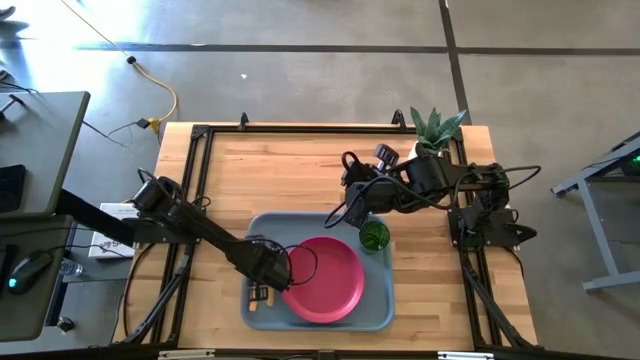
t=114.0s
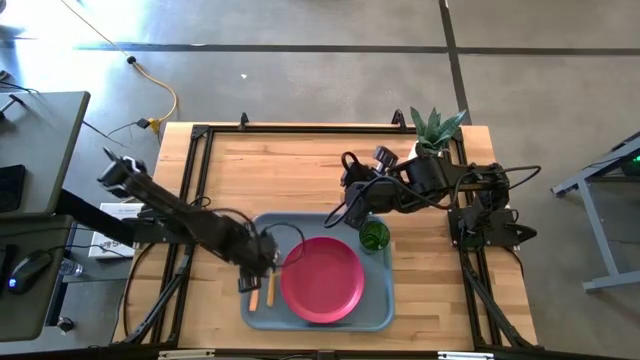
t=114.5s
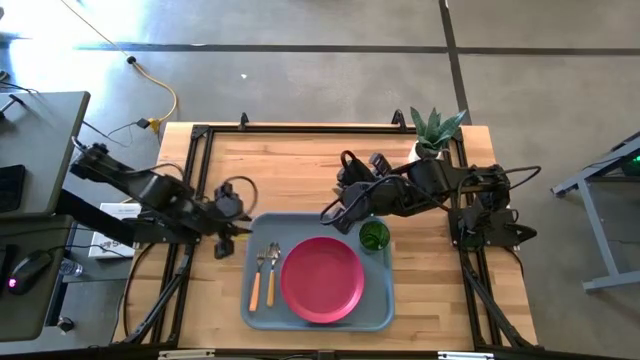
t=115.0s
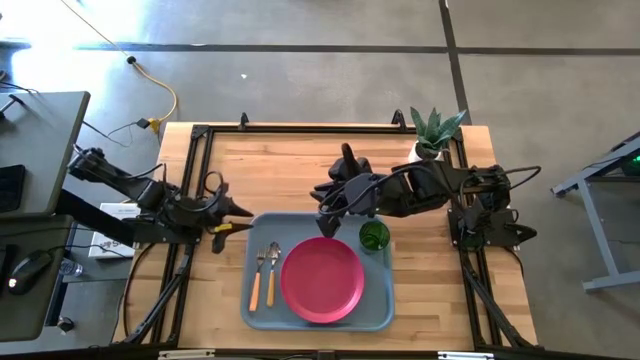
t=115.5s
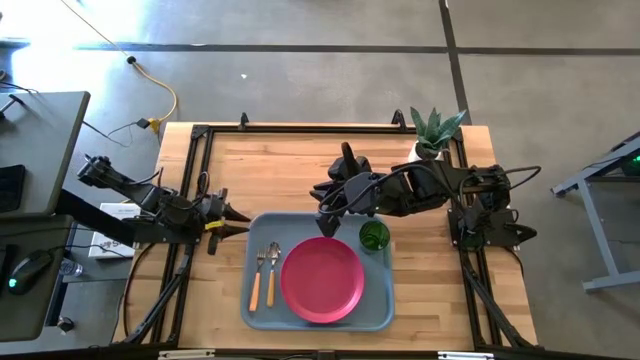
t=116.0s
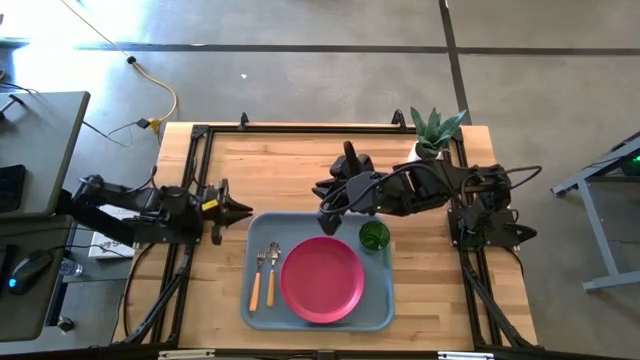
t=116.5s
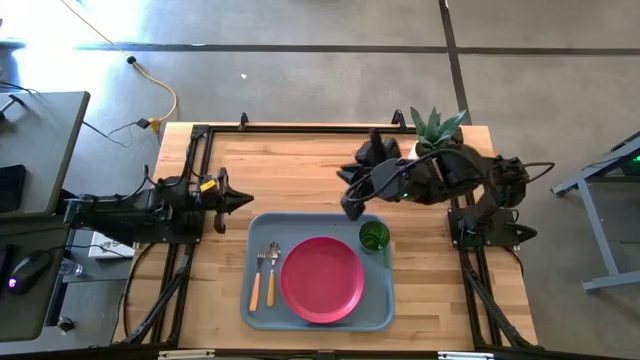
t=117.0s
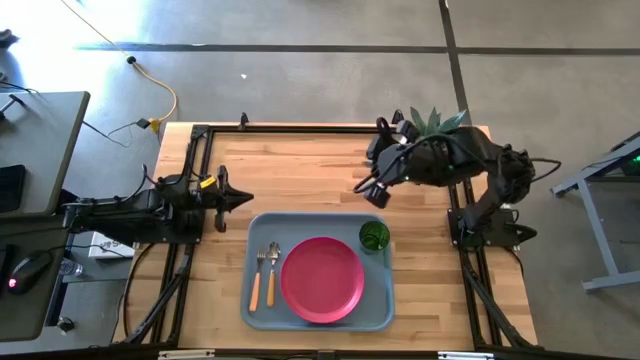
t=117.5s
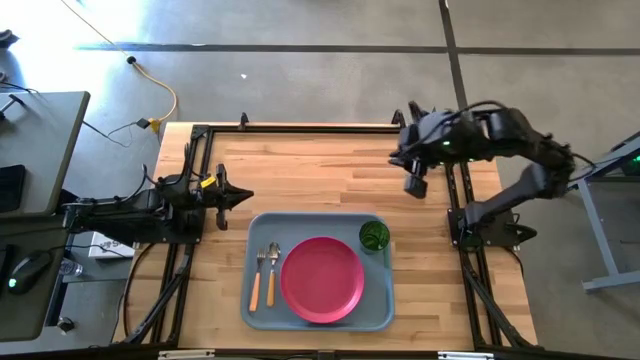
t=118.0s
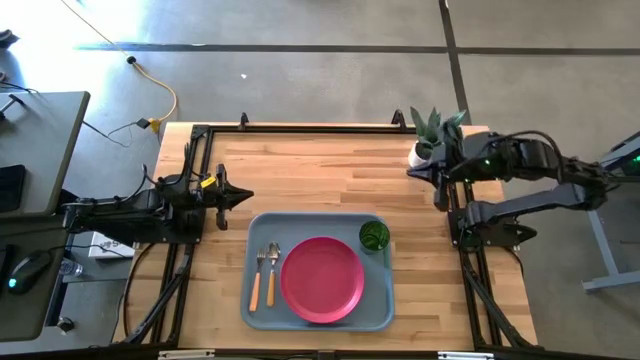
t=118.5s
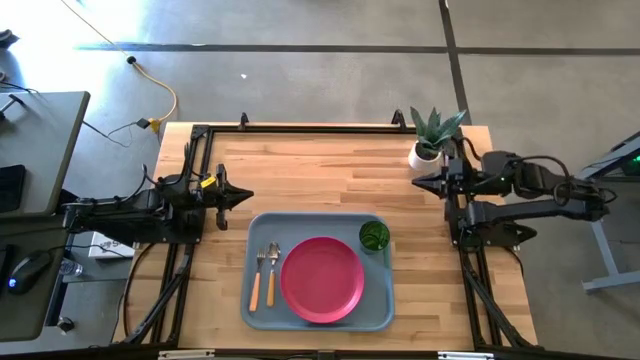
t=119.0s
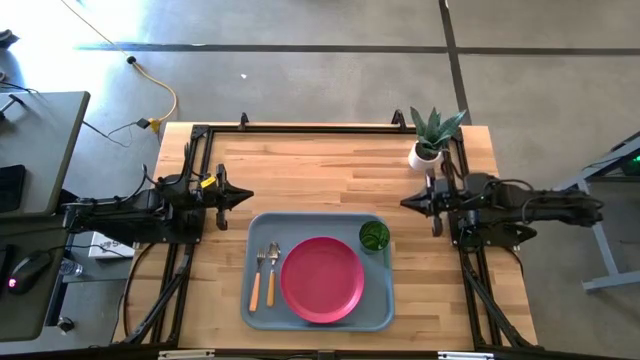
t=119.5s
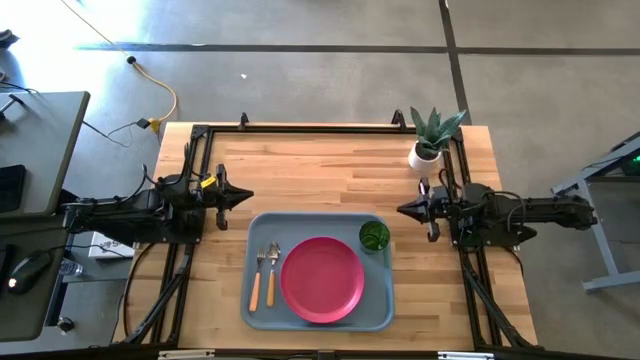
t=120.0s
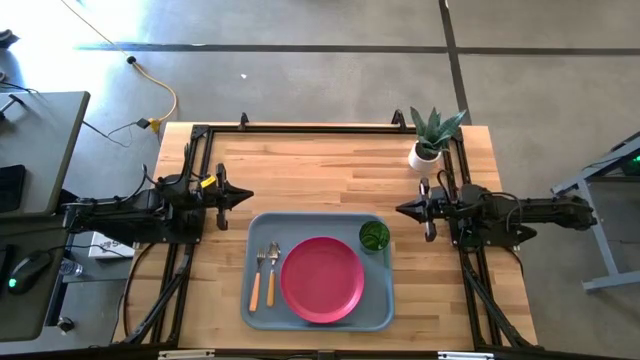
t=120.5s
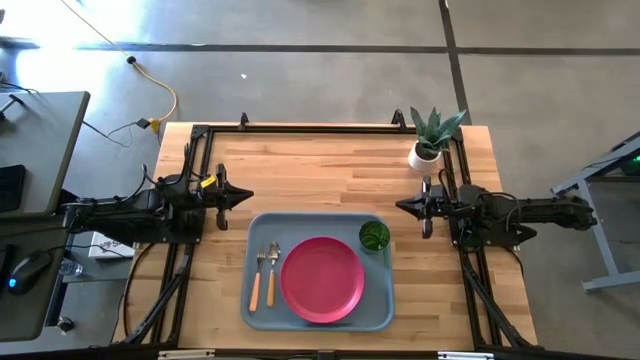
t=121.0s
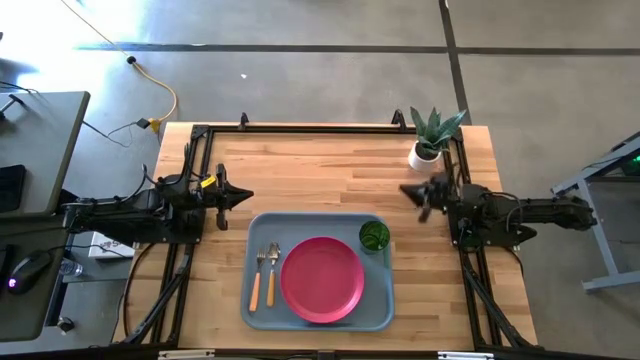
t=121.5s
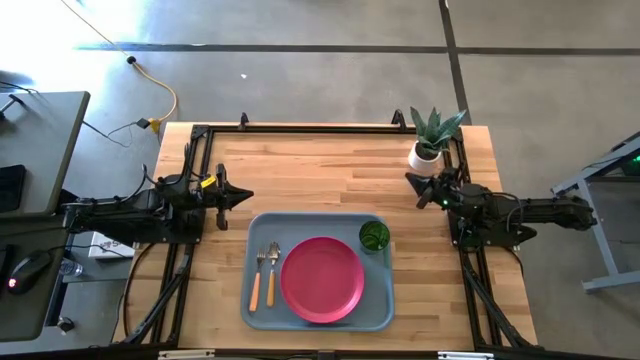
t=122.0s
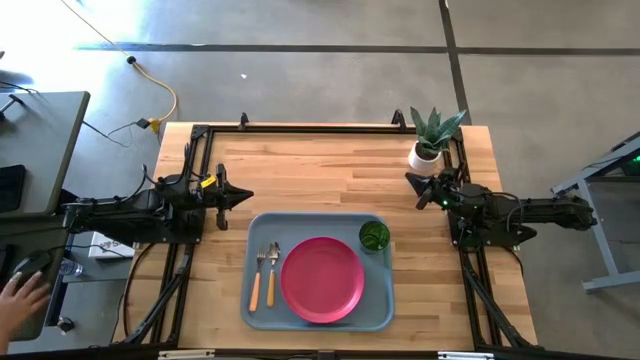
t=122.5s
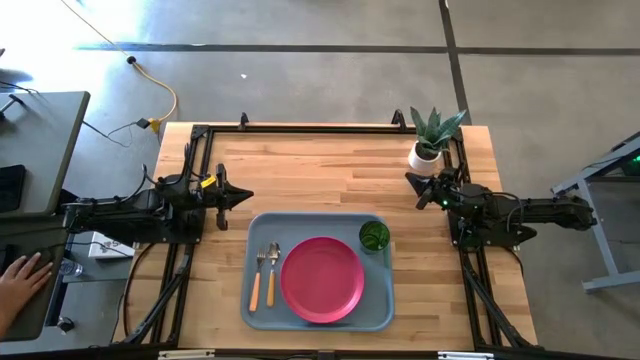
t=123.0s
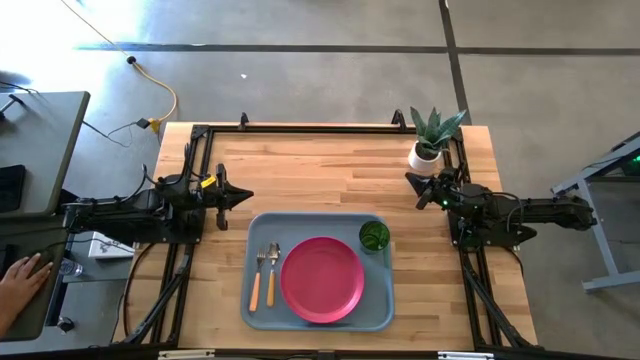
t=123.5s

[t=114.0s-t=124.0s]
Task: Pick and place plate/cup/fork/spoon on tray
Return to Home Position

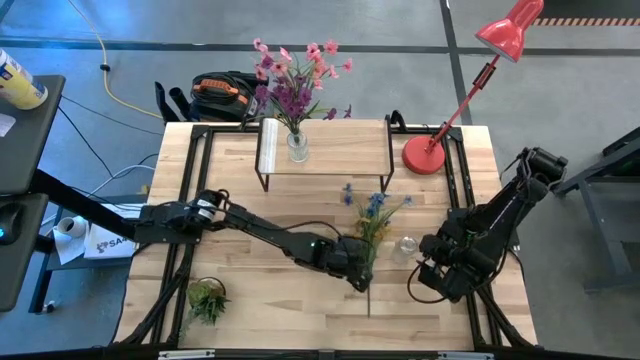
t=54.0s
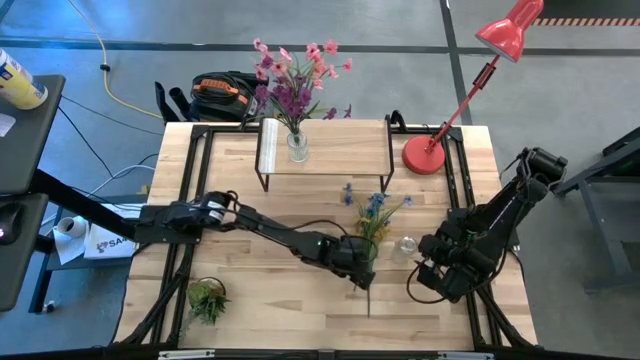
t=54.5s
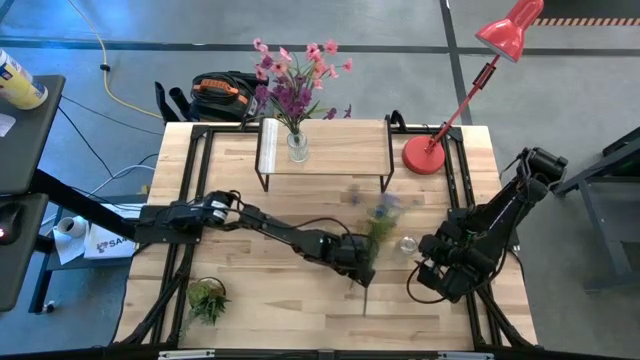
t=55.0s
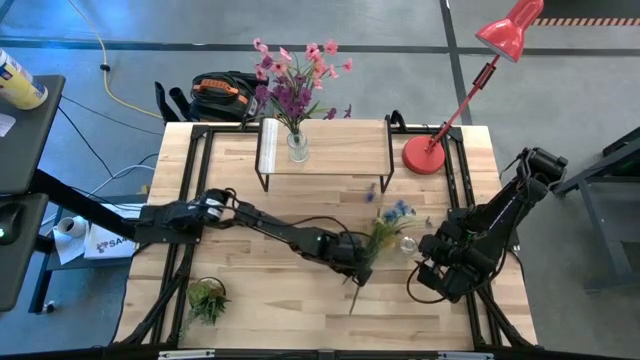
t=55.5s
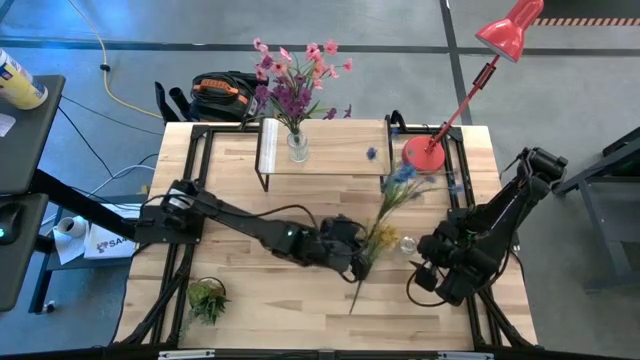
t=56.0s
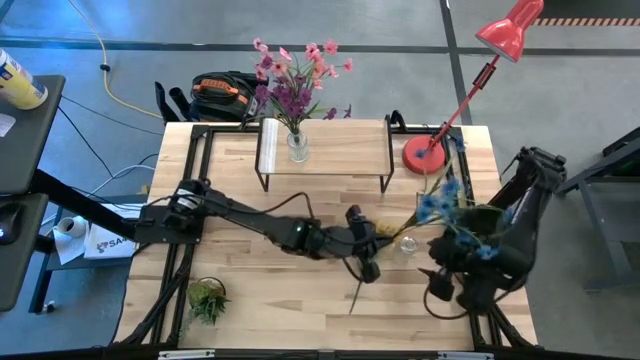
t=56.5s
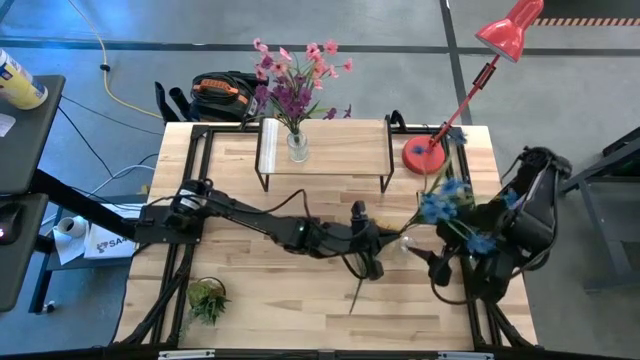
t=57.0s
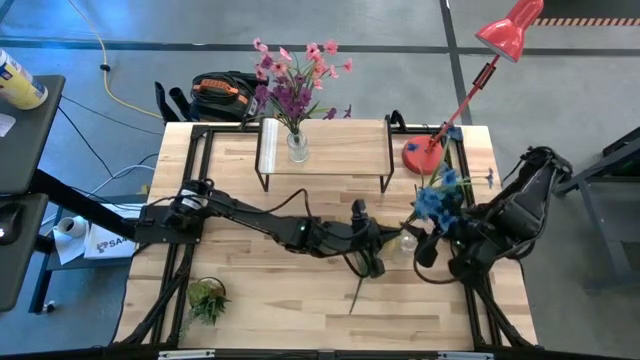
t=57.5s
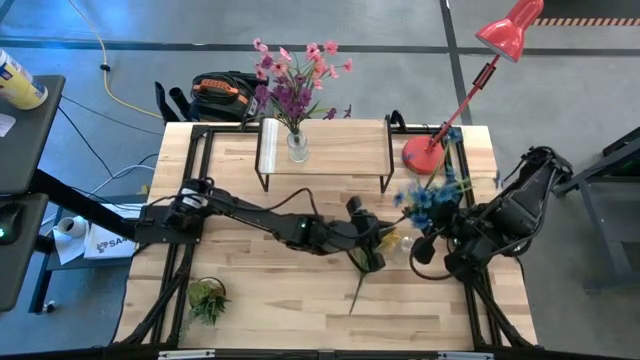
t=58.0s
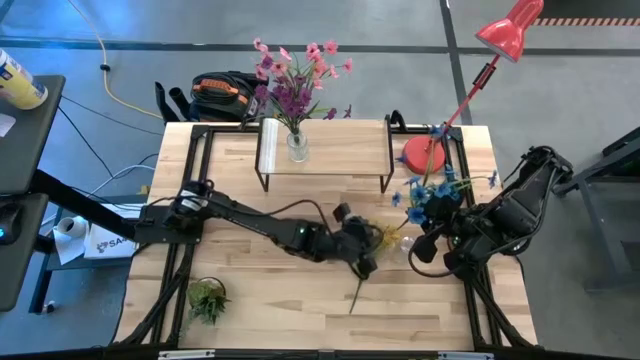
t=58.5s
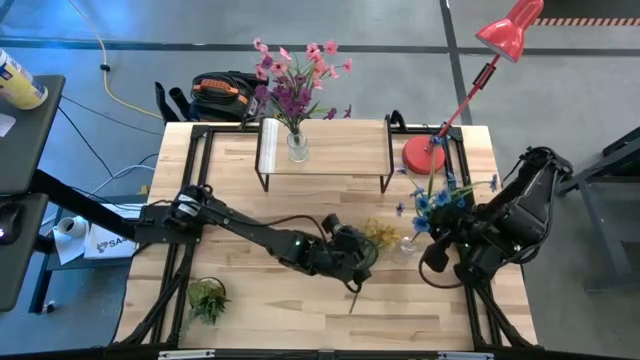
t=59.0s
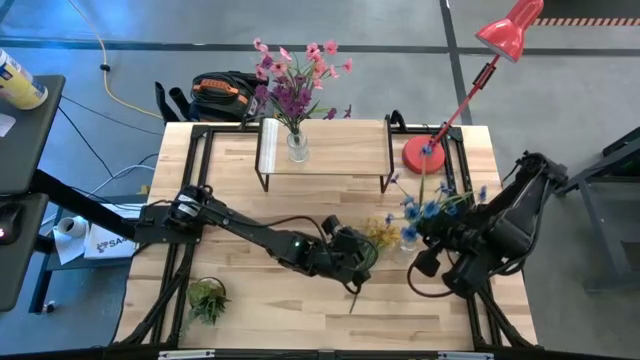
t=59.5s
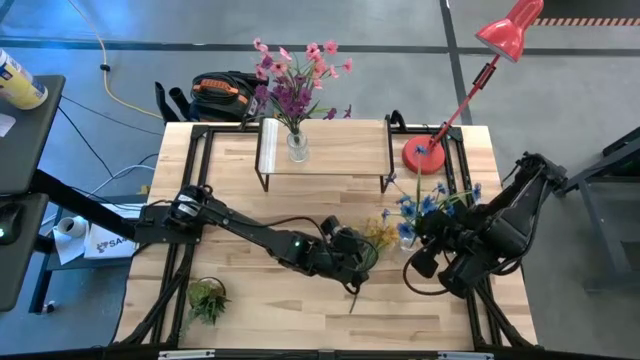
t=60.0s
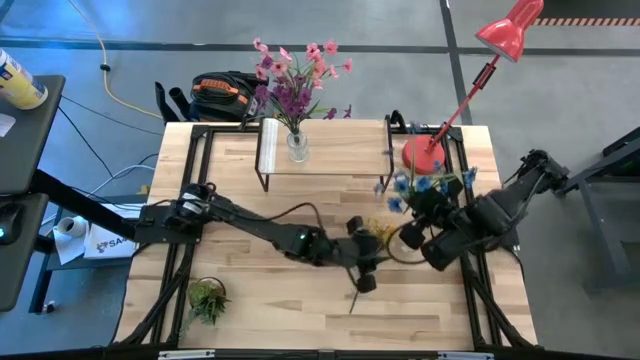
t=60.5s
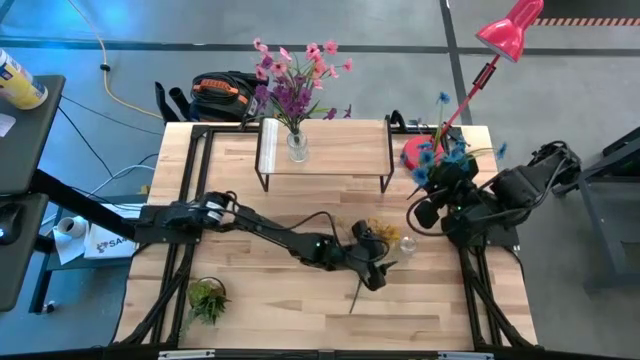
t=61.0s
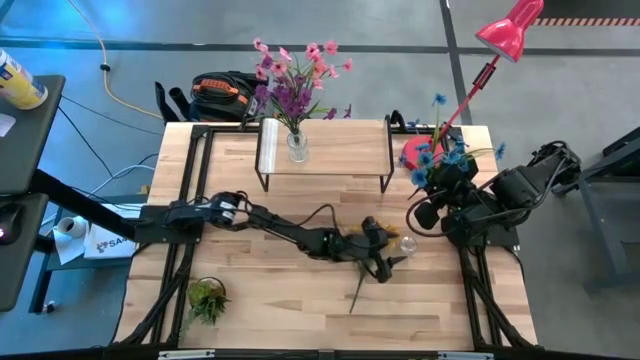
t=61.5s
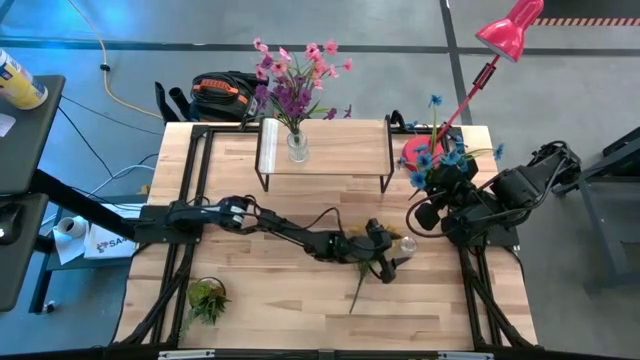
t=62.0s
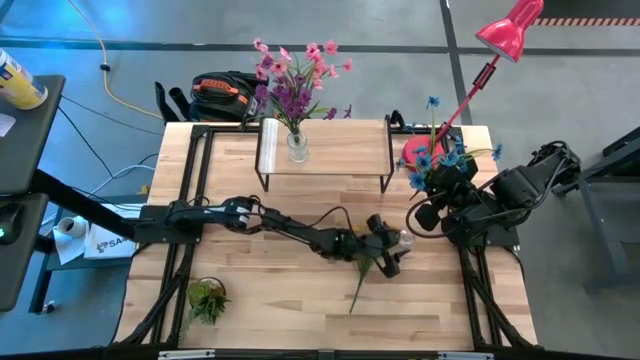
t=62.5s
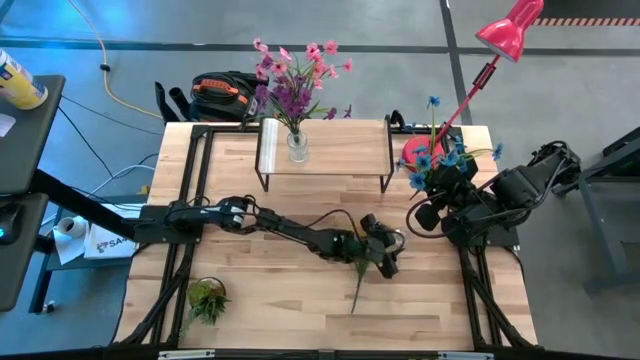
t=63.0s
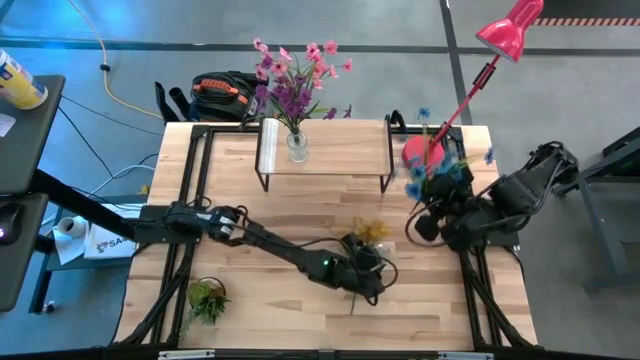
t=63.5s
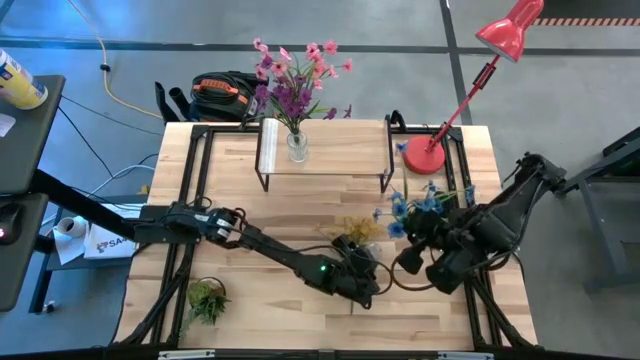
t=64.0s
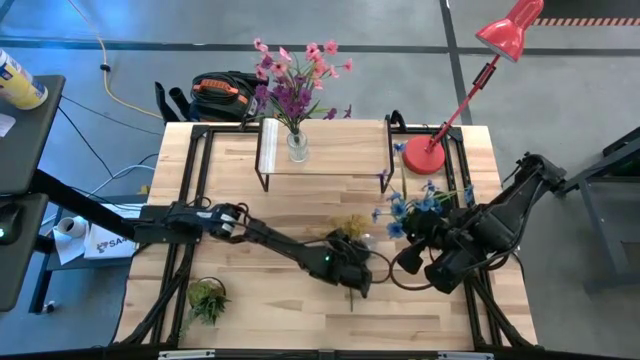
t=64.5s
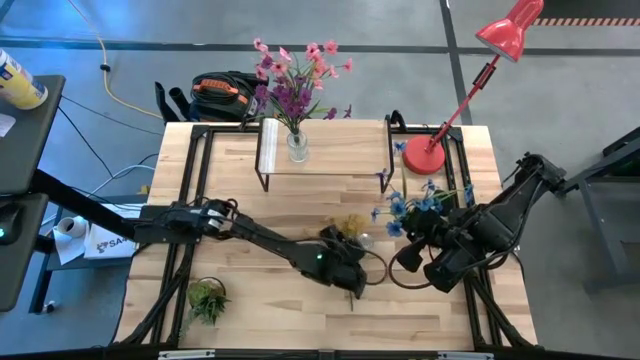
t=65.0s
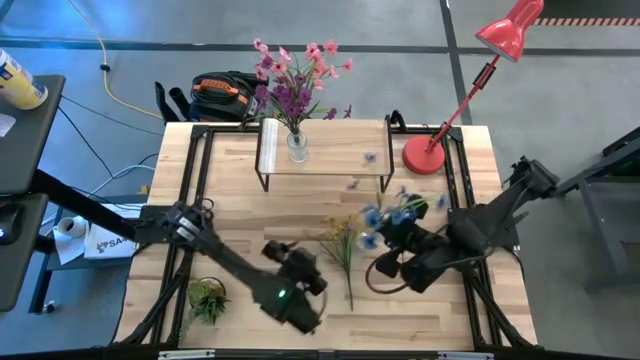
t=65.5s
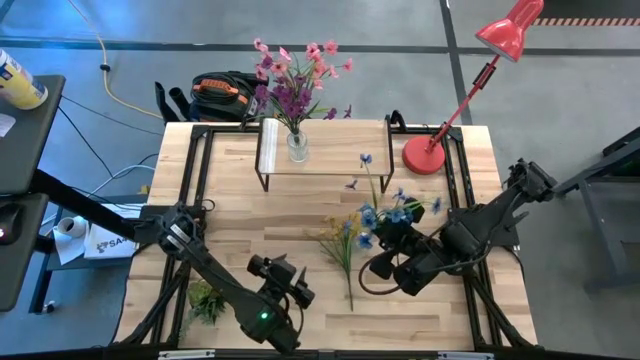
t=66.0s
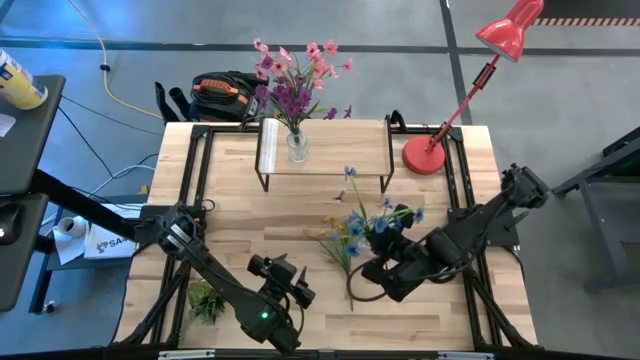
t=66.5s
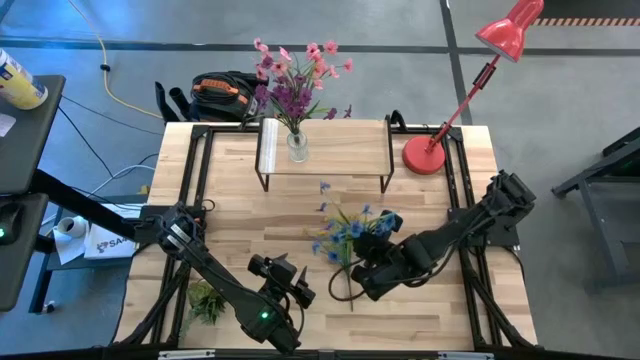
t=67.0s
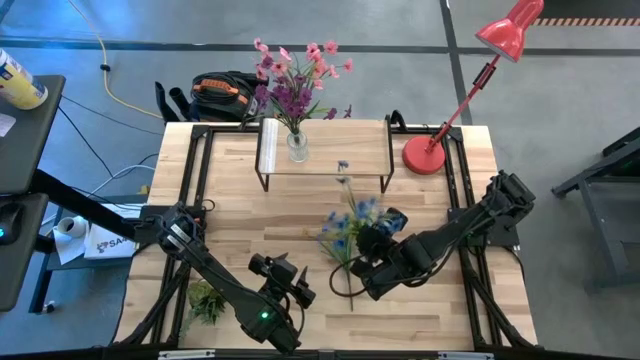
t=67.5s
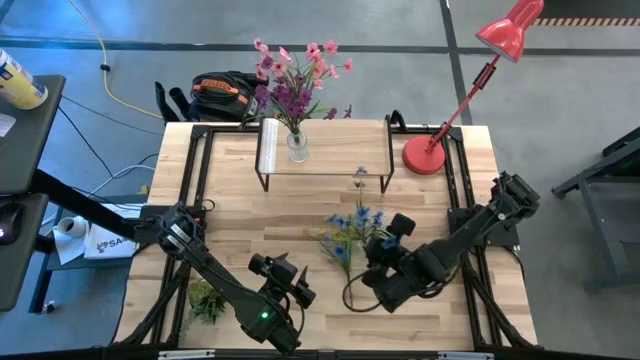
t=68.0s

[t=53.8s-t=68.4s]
Task: Pick and place flowers into a vace then onto a shelf
Put the blue flowers into the transparent vase
